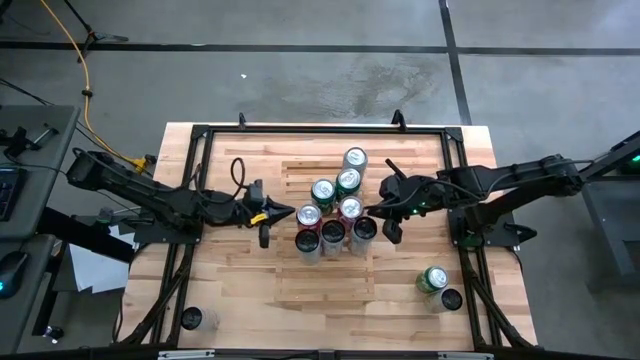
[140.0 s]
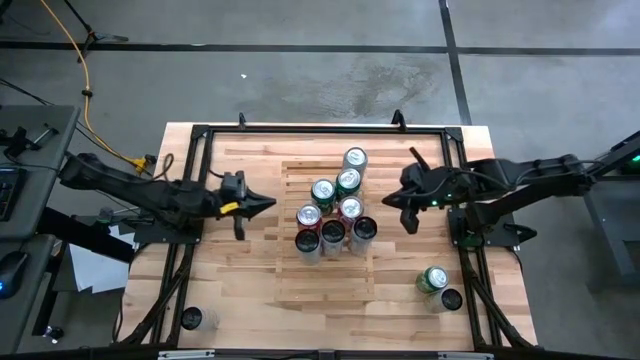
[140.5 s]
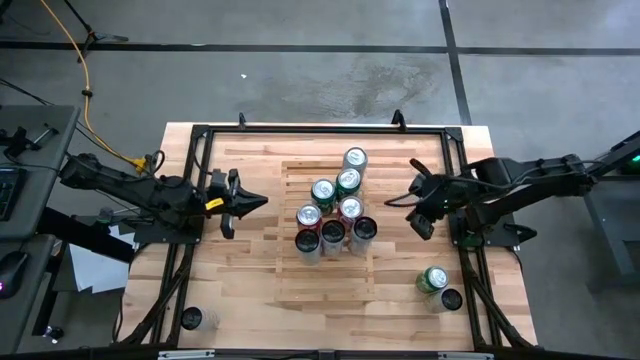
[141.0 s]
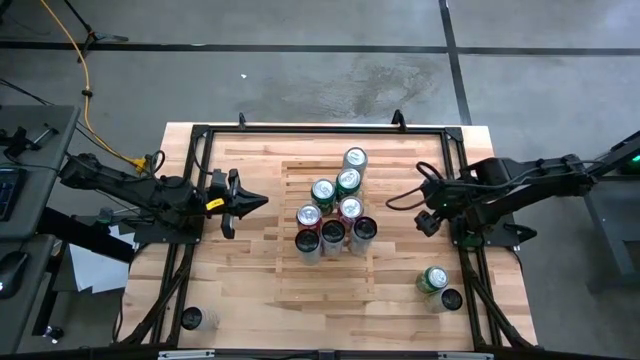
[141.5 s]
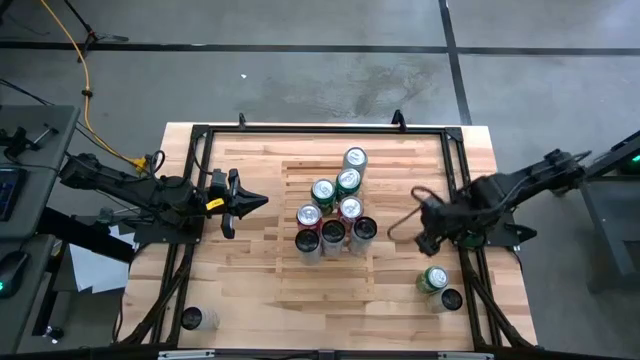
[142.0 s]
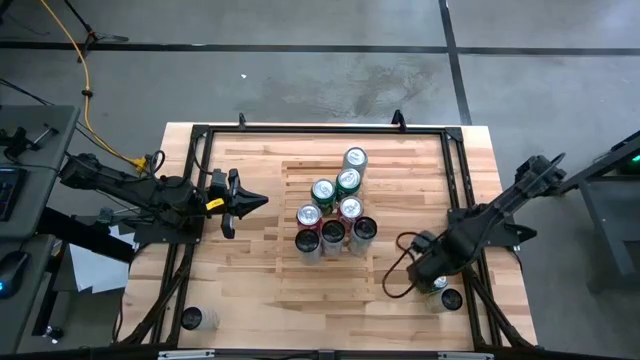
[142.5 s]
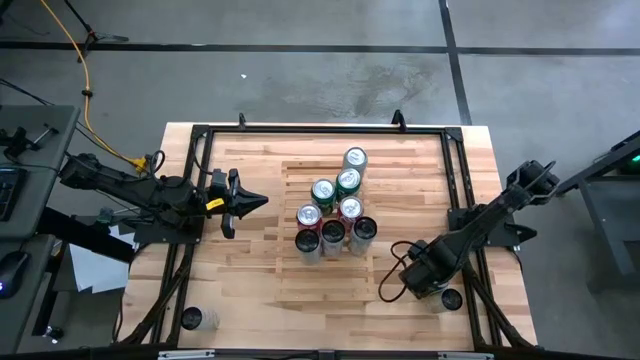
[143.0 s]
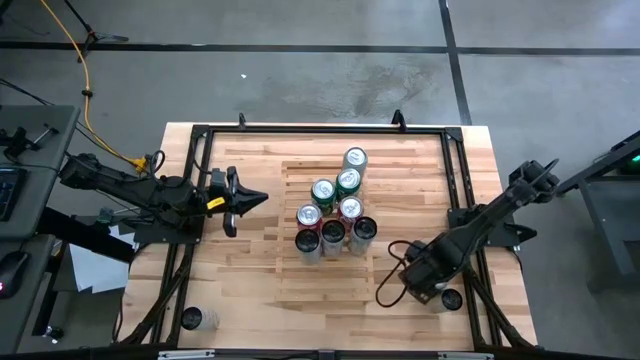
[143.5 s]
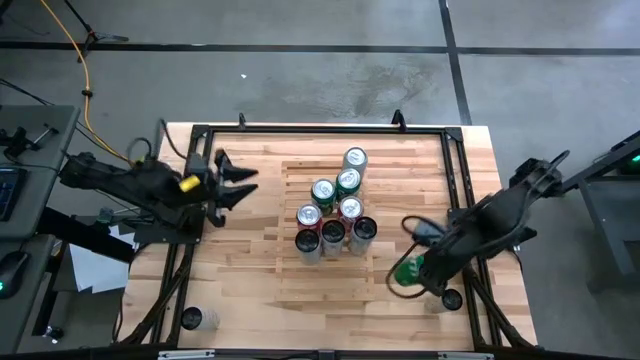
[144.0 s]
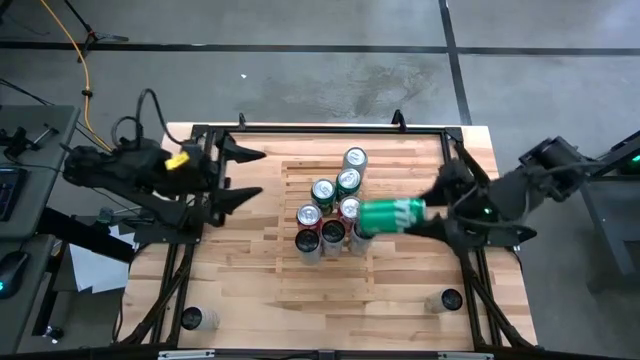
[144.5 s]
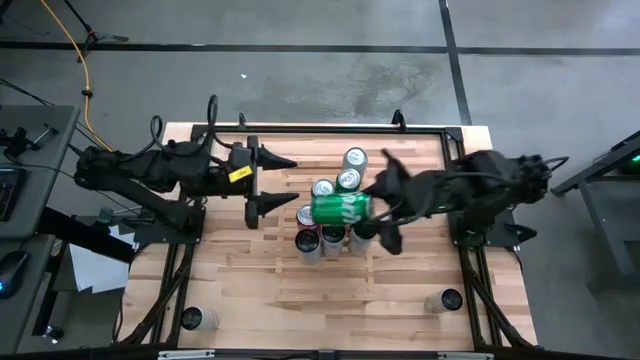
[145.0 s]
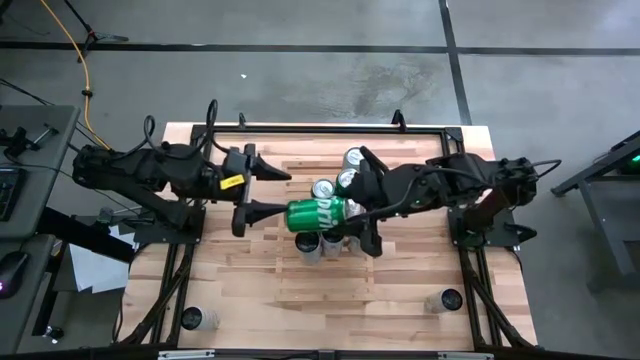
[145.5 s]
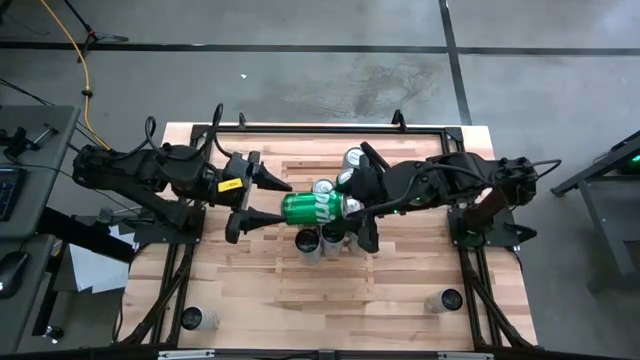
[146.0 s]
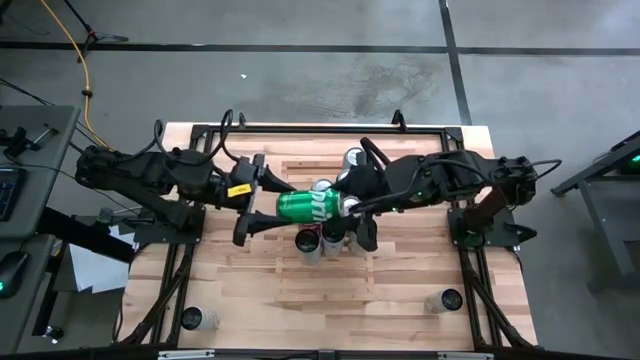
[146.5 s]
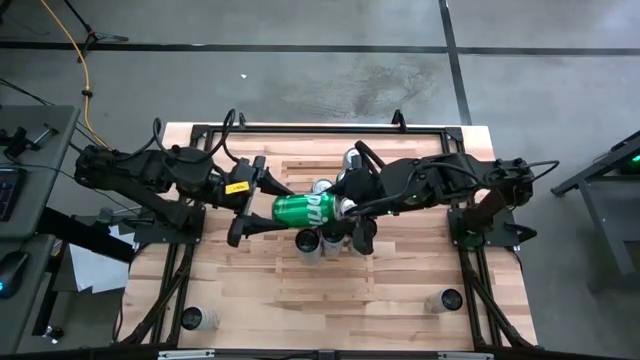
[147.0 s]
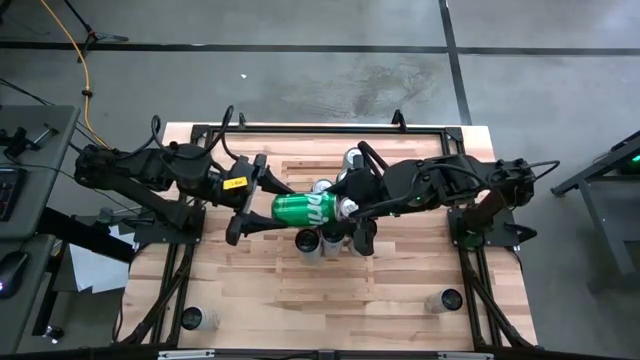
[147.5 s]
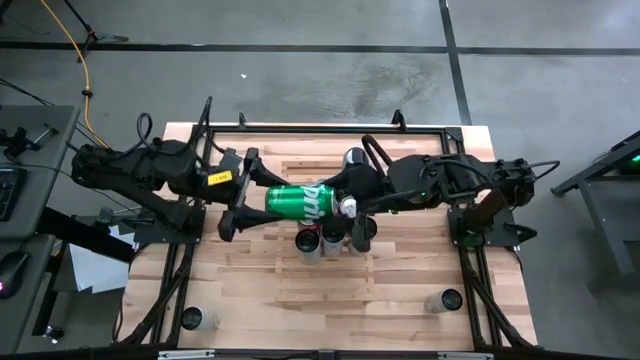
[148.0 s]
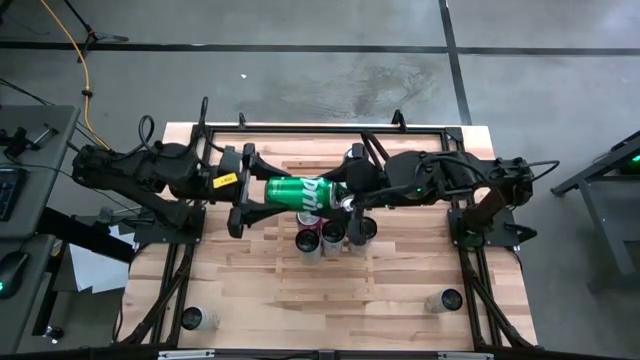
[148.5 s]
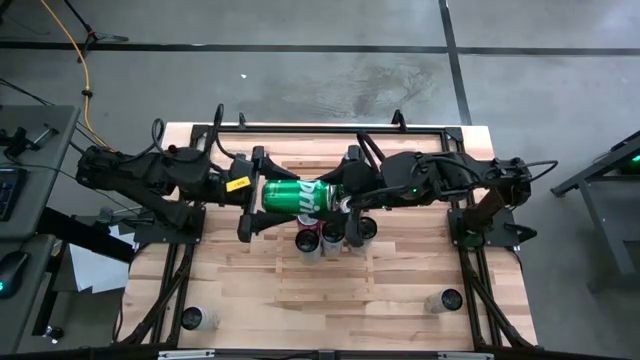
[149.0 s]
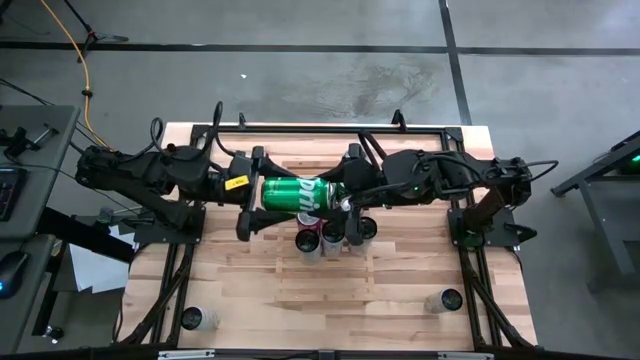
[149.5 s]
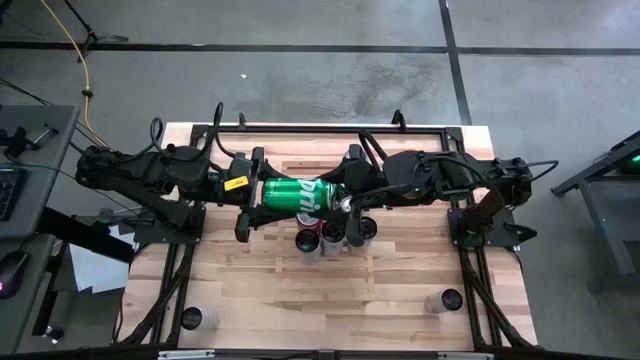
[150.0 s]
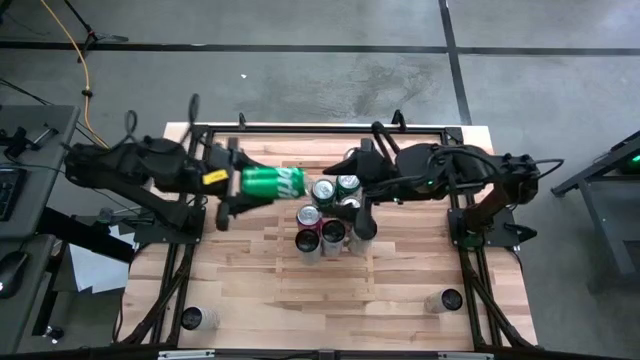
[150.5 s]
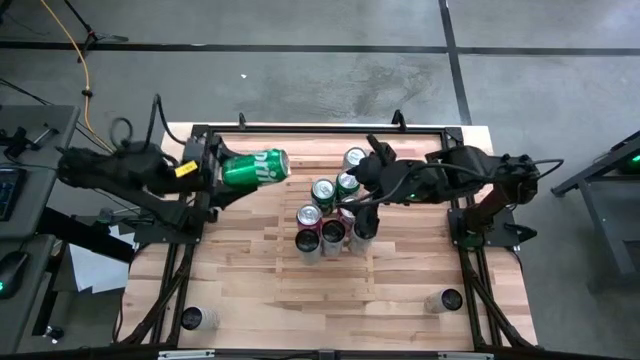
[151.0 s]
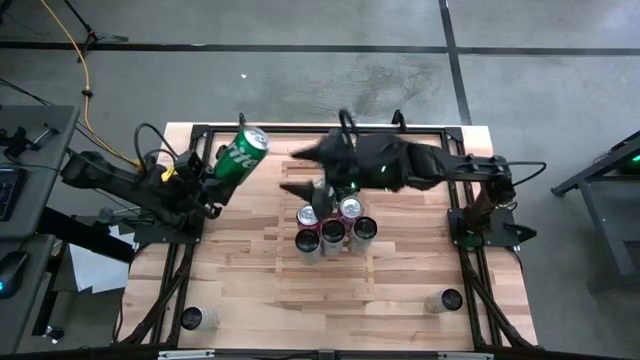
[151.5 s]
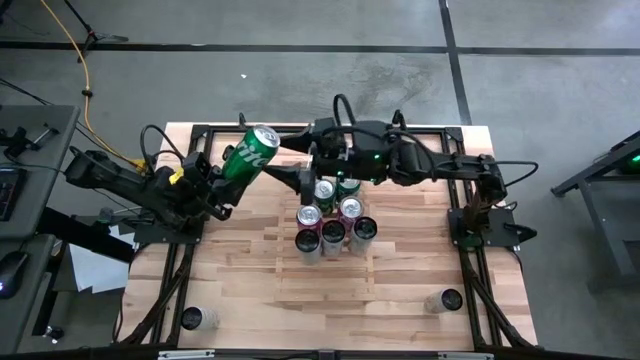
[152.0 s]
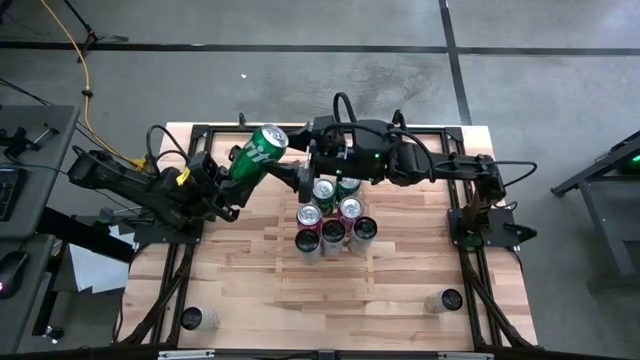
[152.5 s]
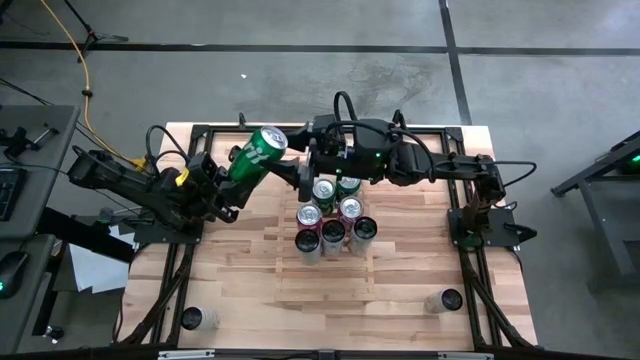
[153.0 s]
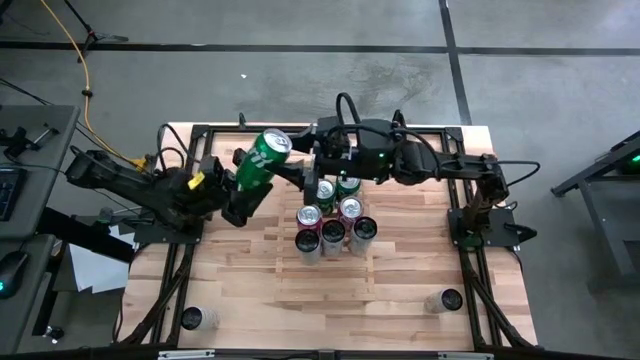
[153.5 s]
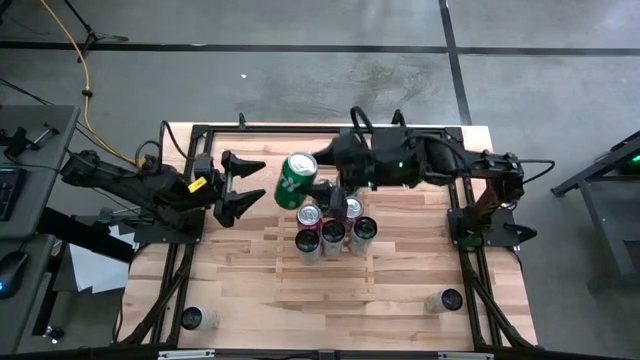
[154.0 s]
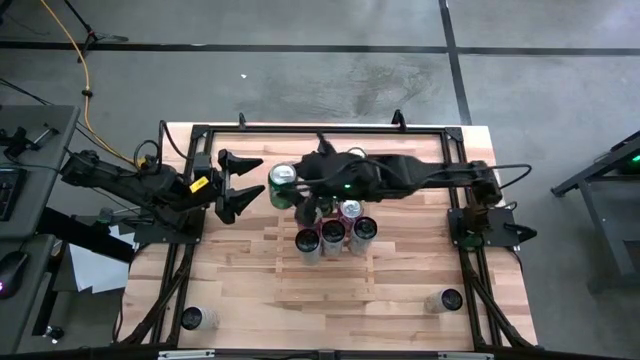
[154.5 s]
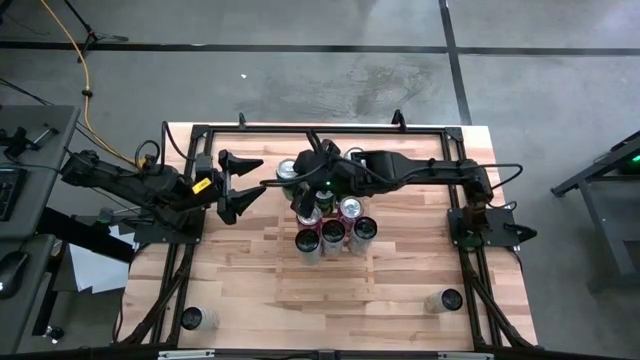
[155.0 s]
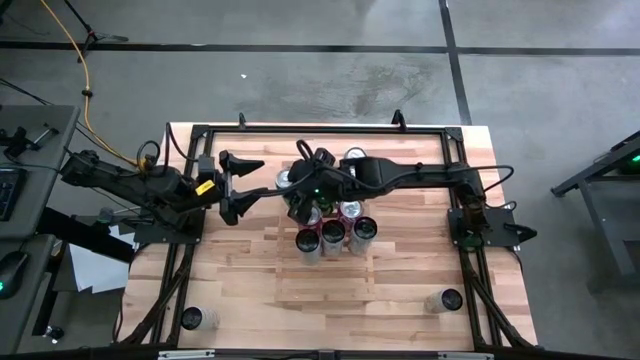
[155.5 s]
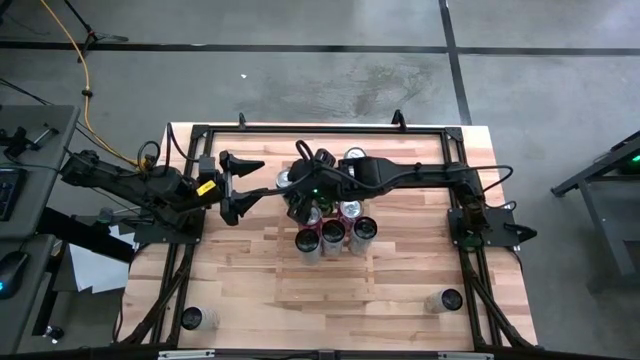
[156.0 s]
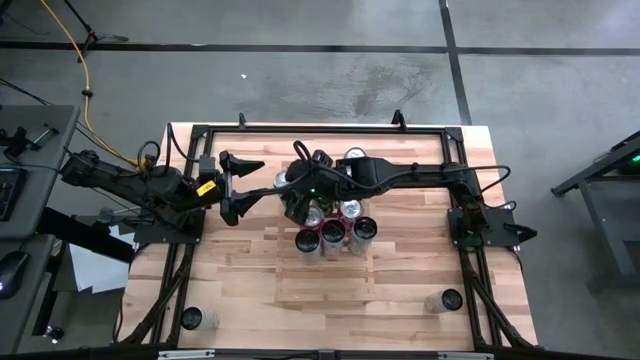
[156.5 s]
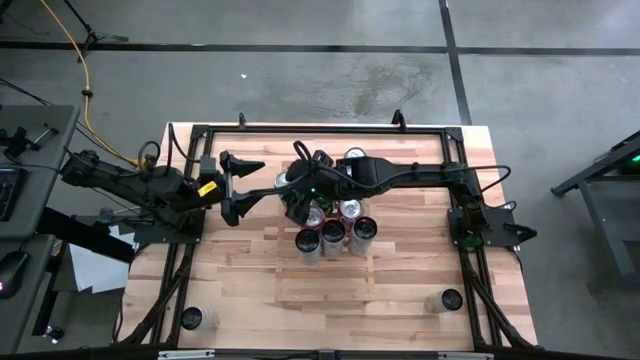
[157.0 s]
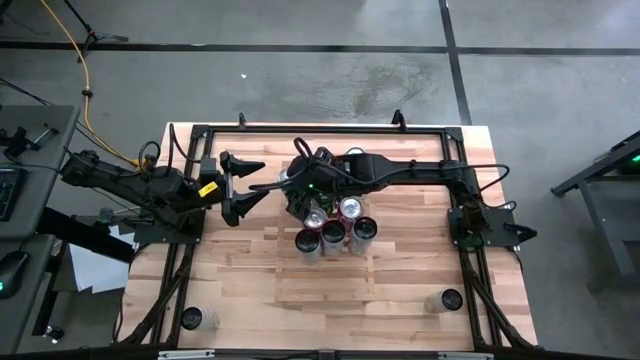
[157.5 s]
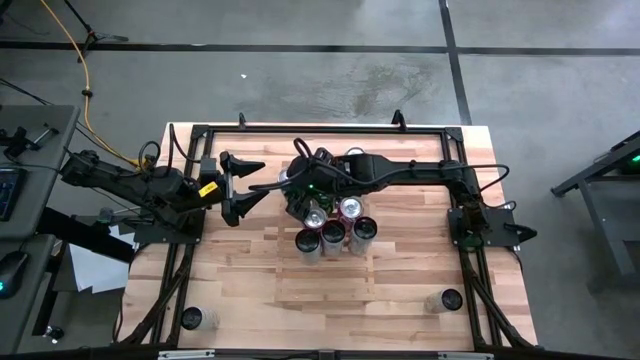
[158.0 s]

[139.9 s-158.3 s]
Task: Place canned beverage on shelf
Put the green soda can on the shelf aligned with the other green soda cans

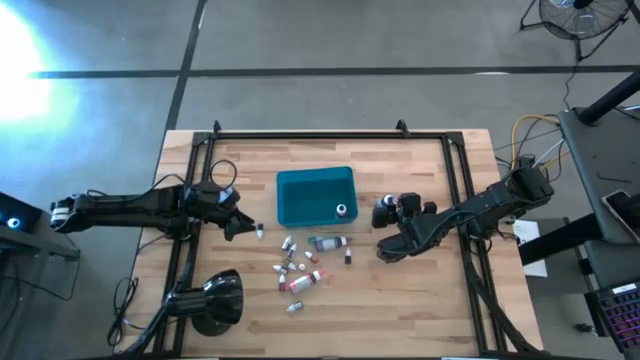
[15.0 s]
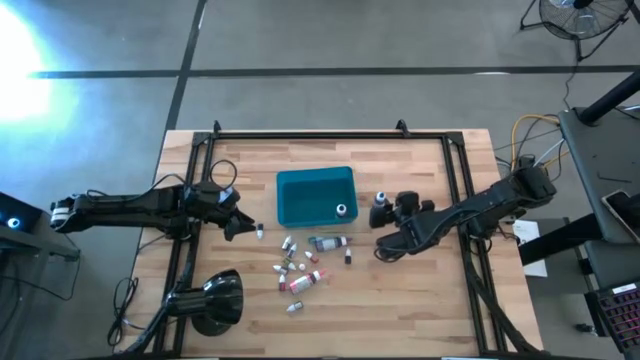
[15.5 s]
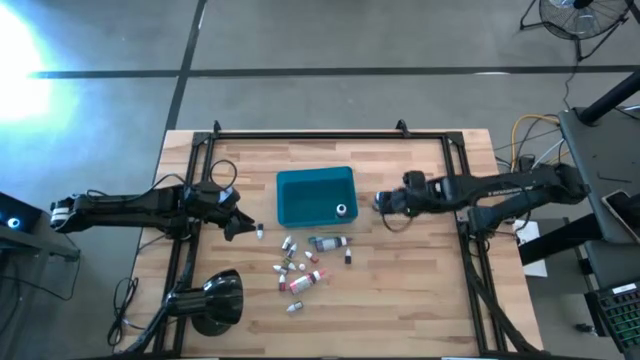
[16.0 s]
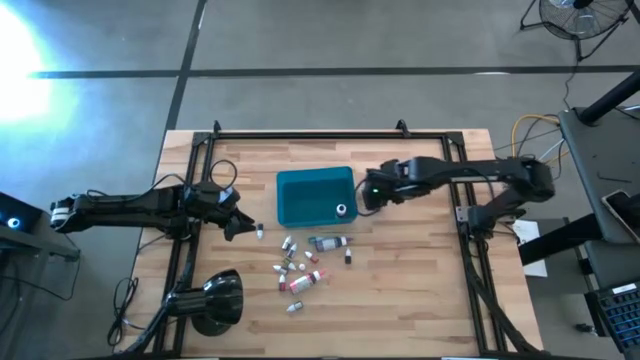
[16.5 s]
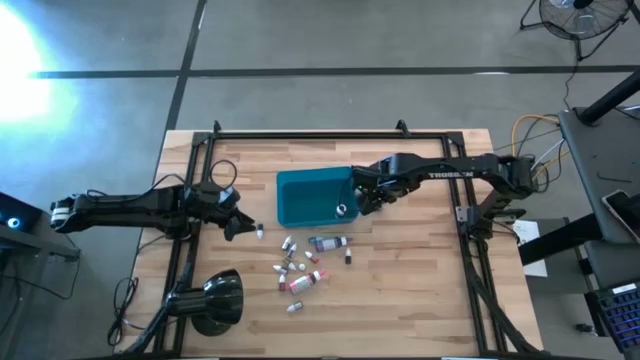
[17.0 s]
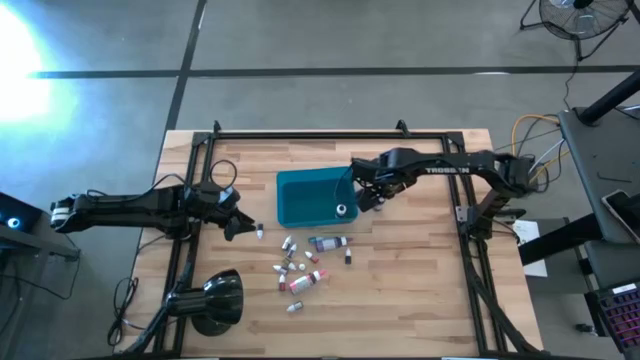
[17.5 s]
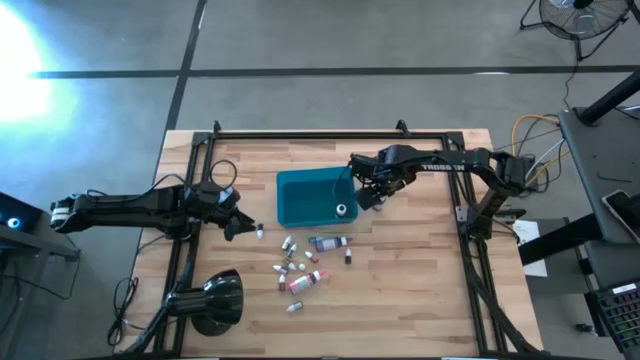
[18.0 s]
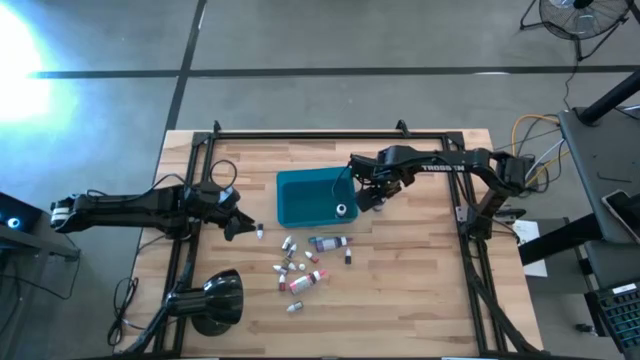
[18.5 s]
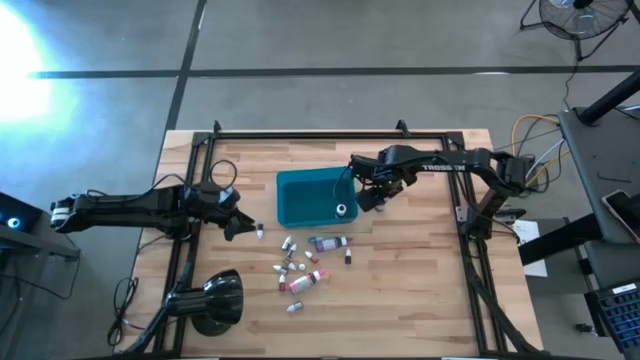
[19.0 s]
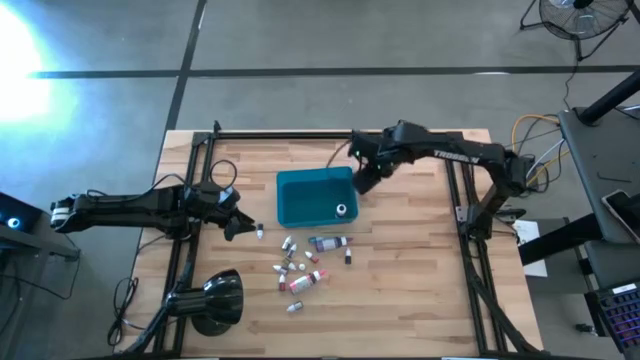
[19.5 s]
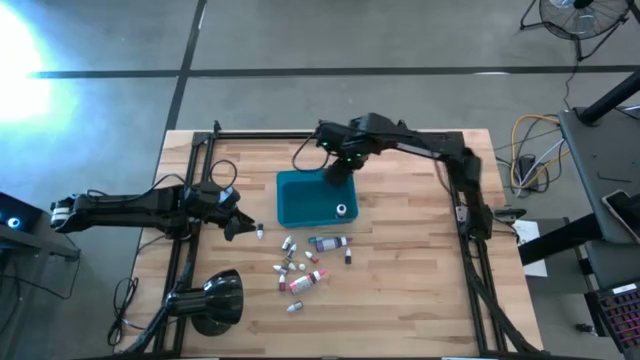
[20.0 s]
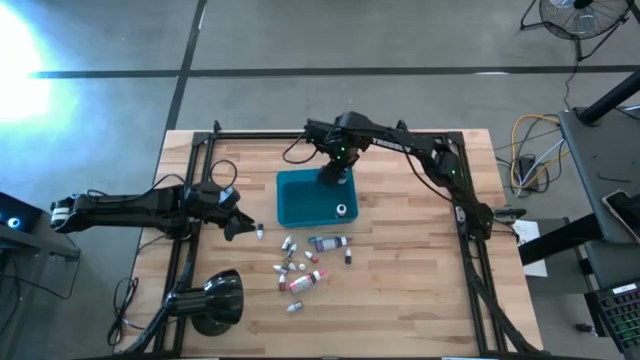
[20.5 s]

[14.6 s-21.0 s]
Task: Pick & Place food coloring
Put the large blue food coloring bottle into the blue bin
